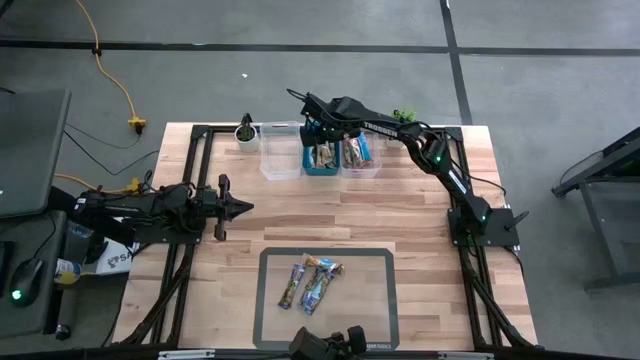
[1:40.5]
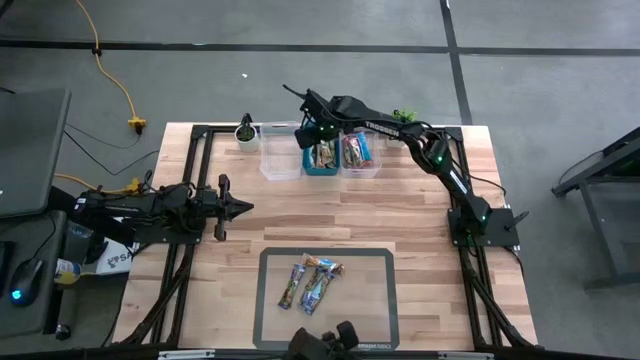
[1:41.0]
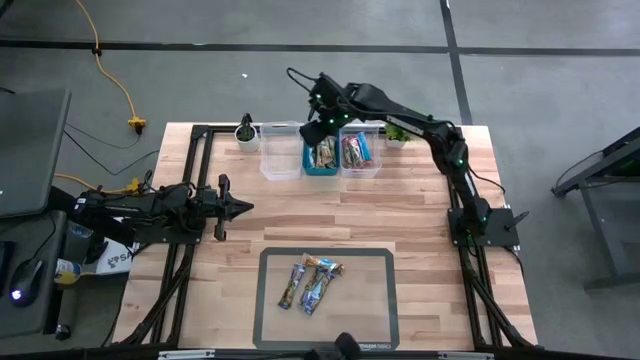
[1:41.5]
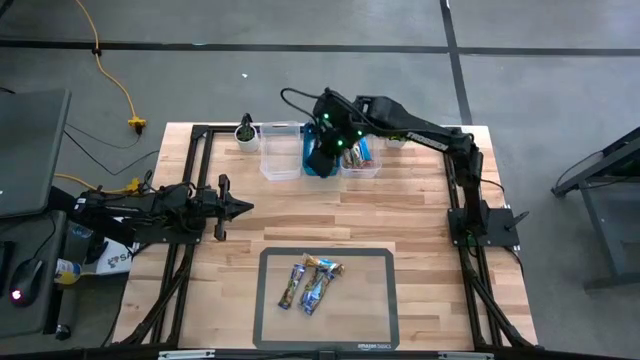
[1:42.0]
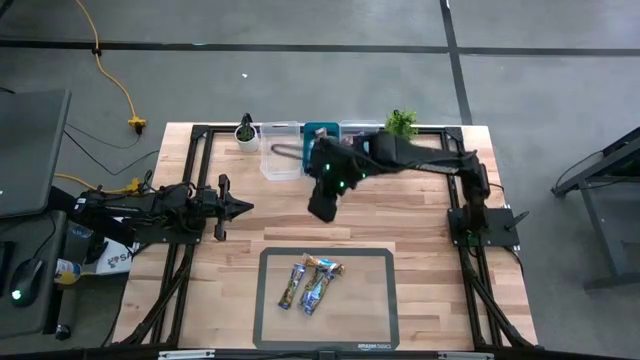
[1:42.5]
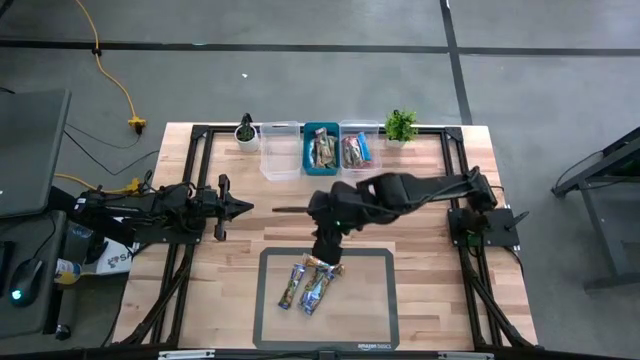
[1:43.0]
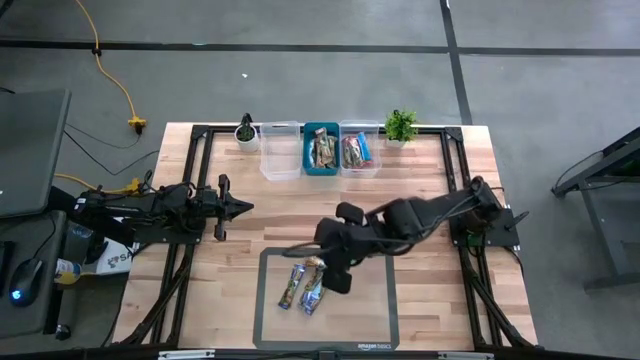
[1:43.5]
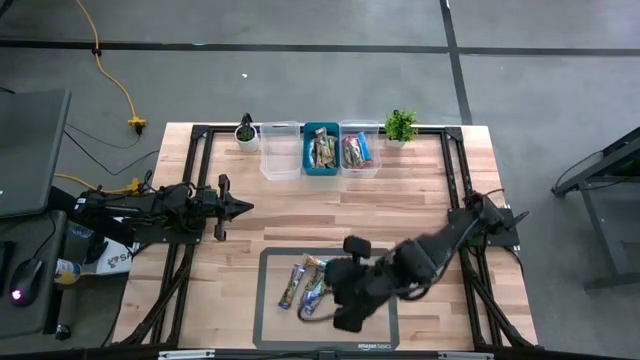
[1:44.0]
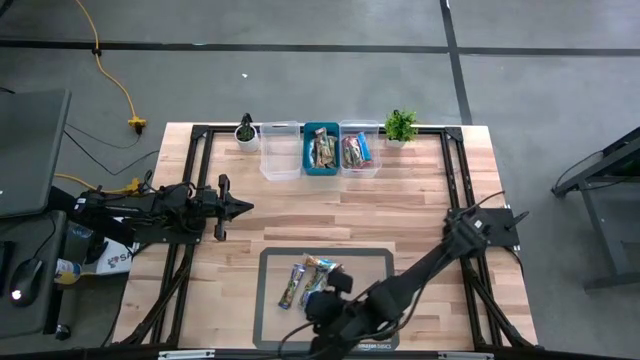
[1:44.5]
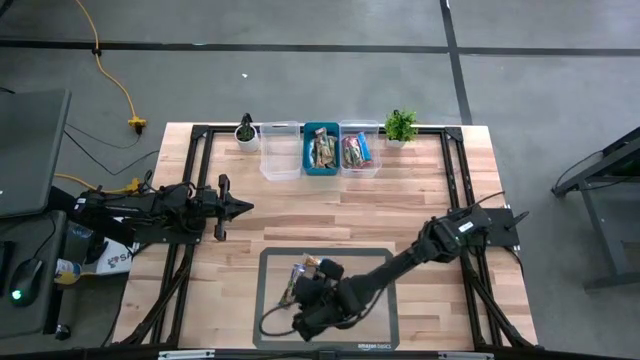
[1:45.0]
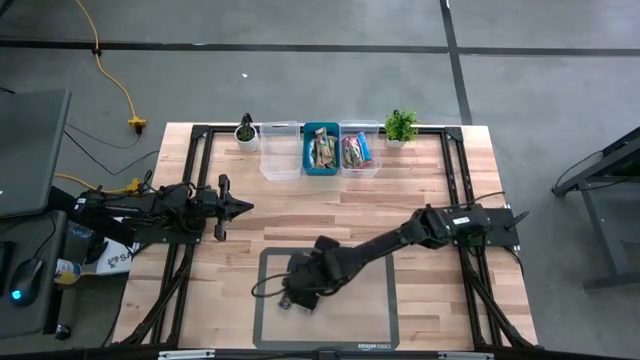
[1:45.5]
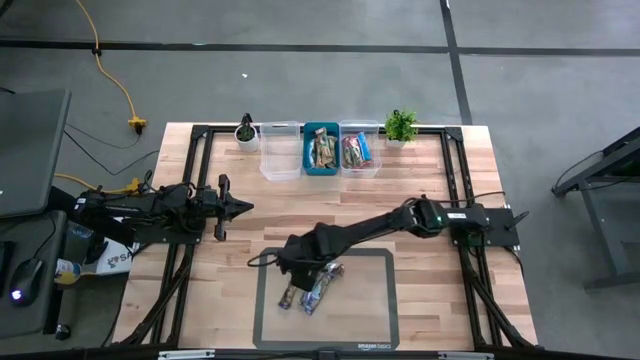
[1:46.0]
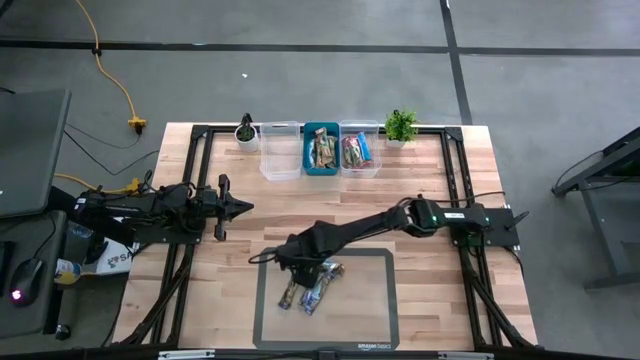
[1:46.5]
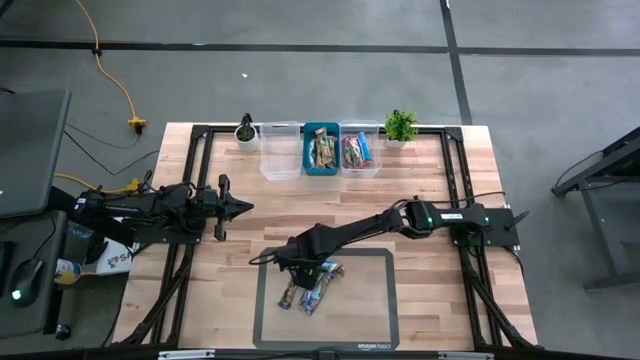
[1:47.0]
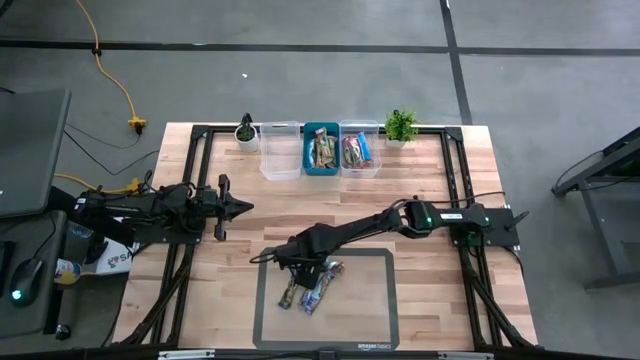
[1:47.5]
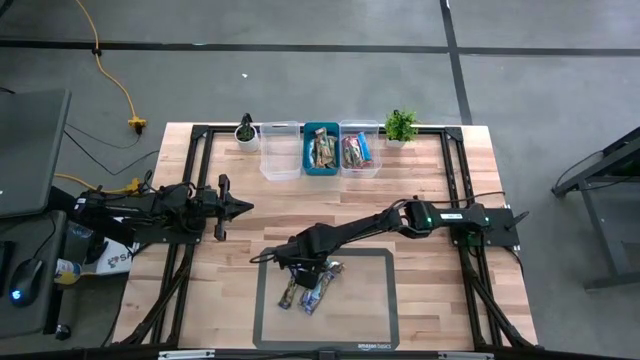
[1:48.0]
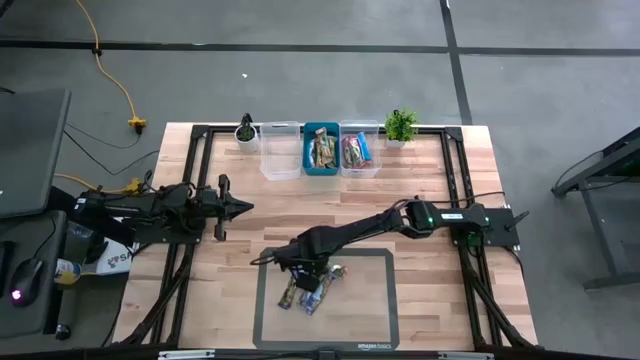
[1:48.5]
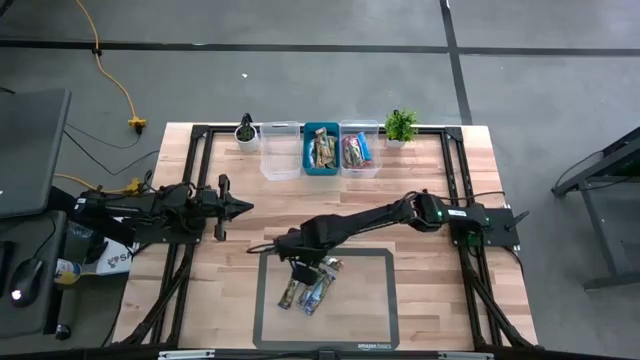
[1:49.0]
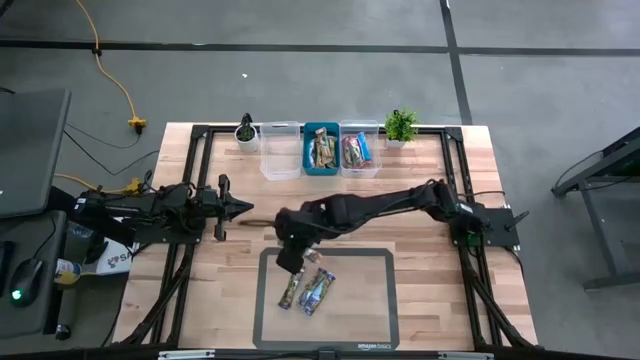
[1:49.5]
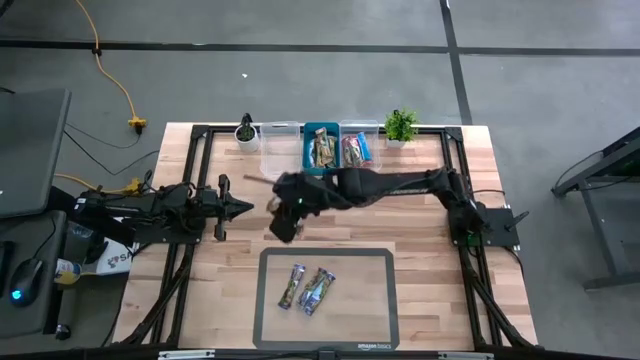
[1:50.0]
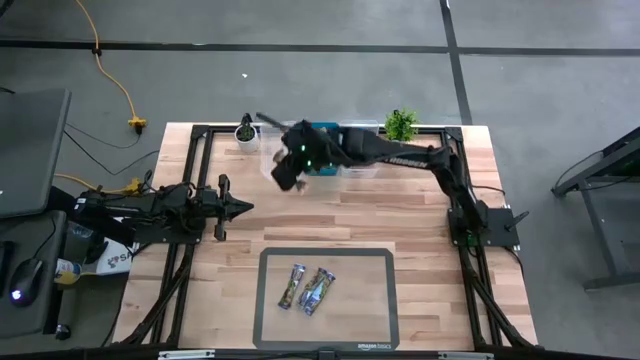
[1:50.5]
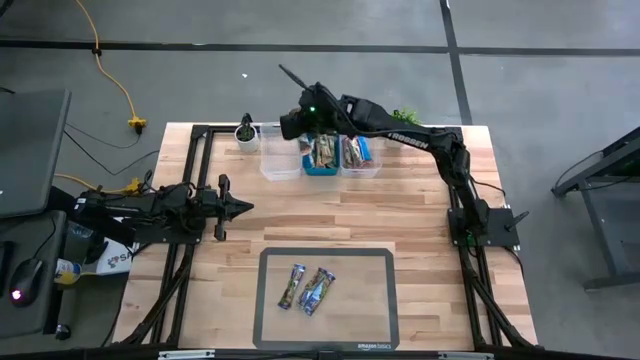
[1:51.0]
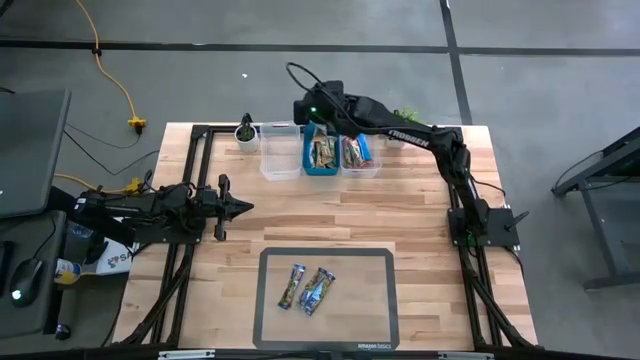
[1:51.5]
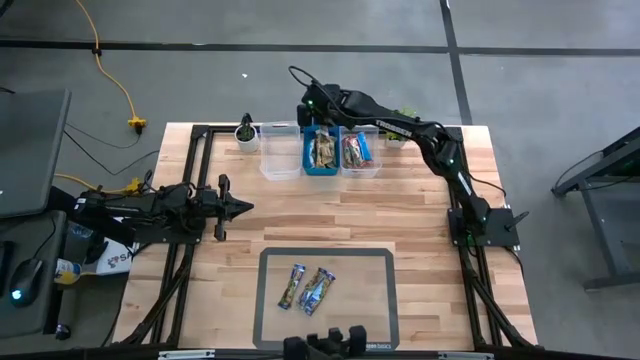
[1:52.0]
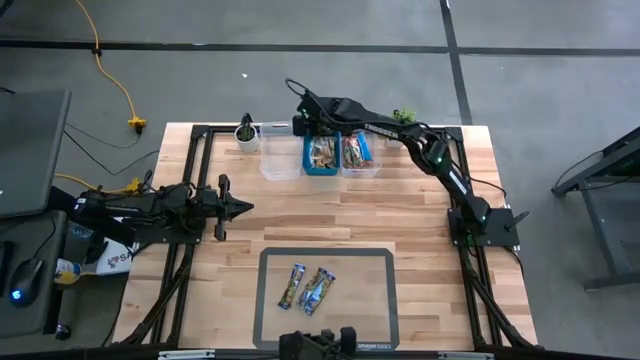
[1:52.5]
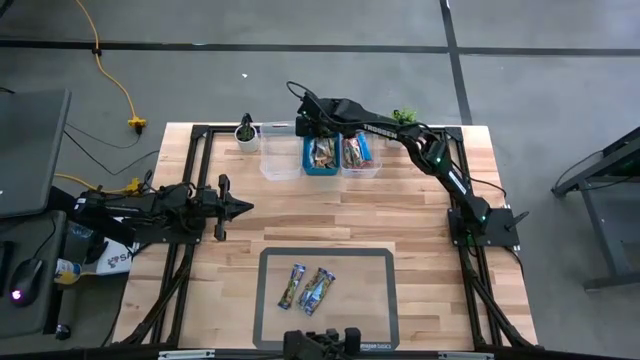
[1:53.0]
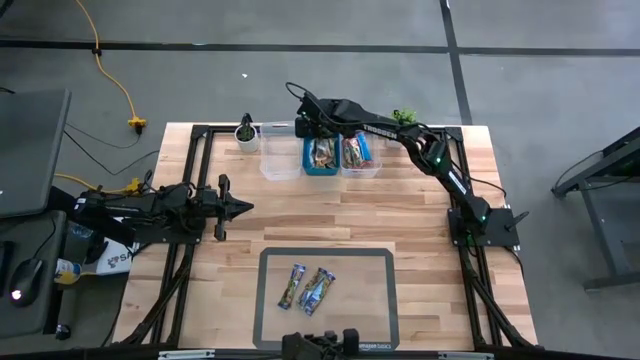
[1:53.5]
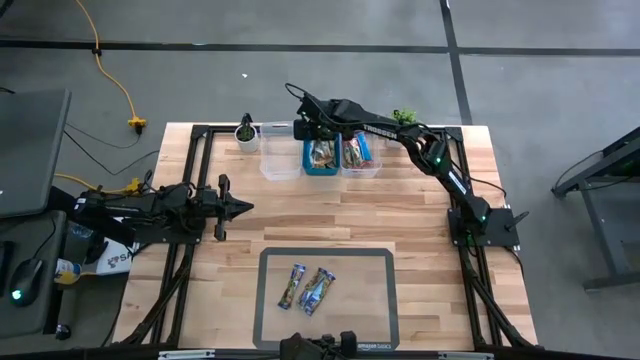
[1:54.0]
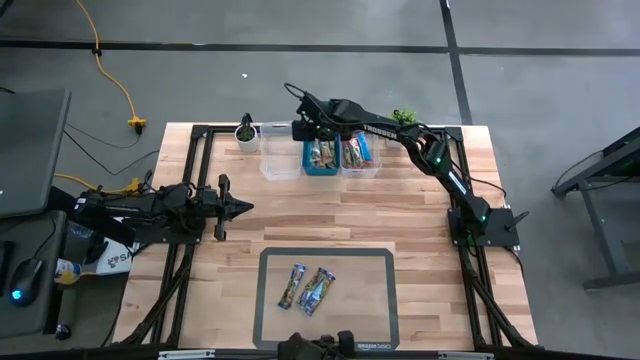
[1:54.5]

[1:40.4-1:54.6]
Task: Pick and place Granola Bars by type
Put the yellow granola bar into the blue bin

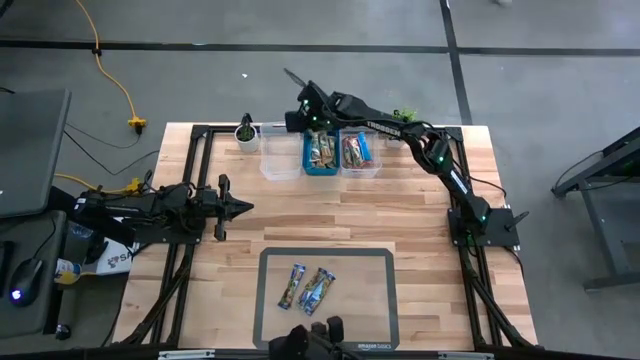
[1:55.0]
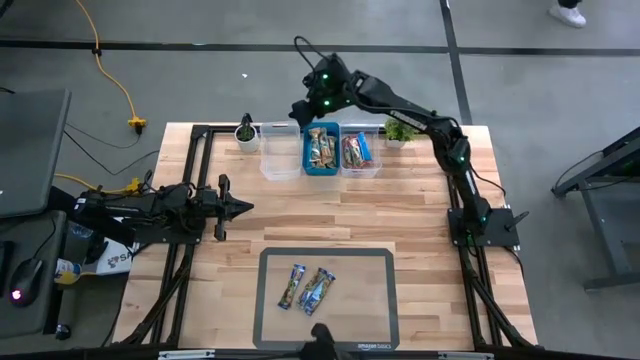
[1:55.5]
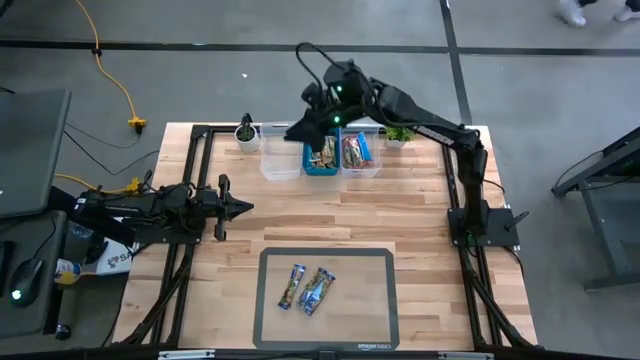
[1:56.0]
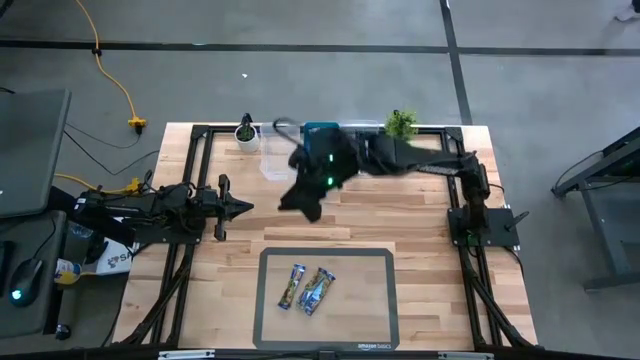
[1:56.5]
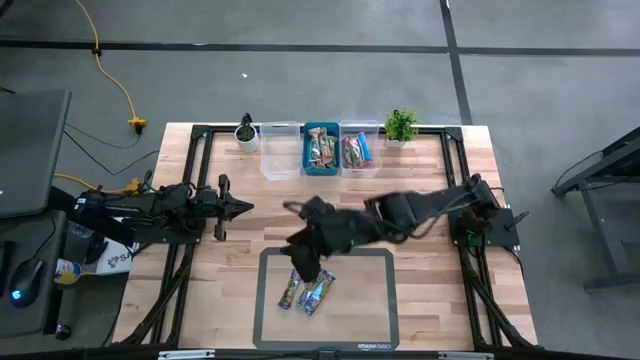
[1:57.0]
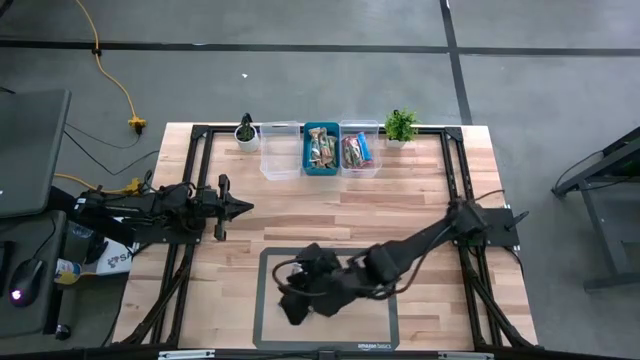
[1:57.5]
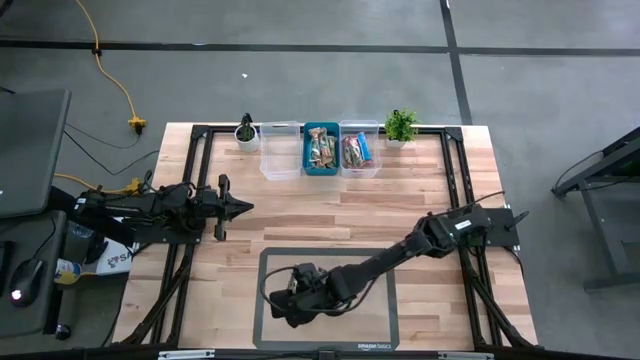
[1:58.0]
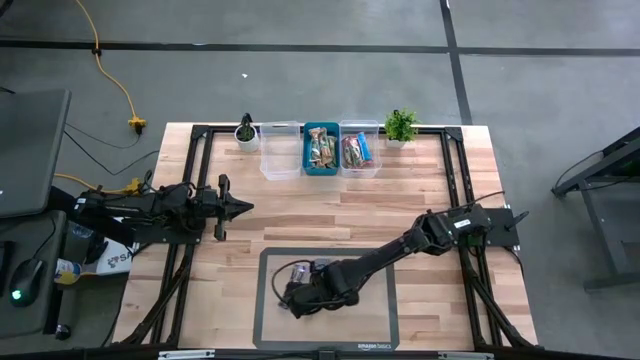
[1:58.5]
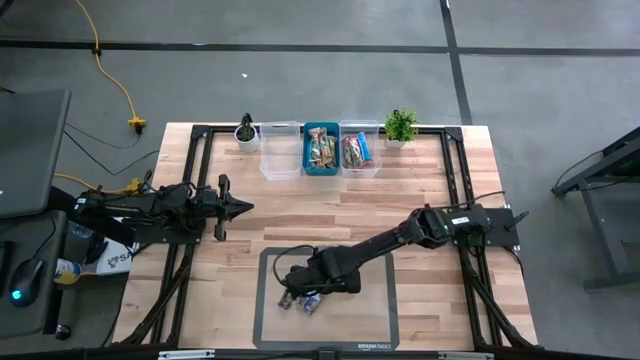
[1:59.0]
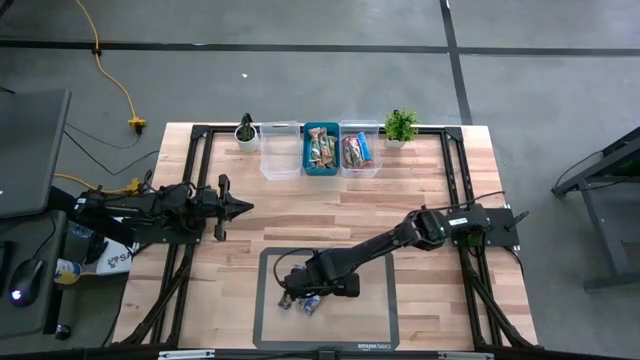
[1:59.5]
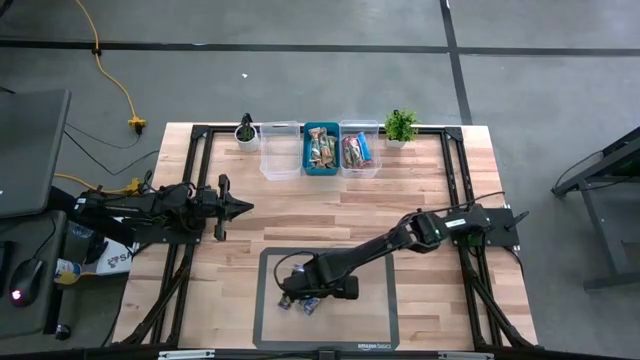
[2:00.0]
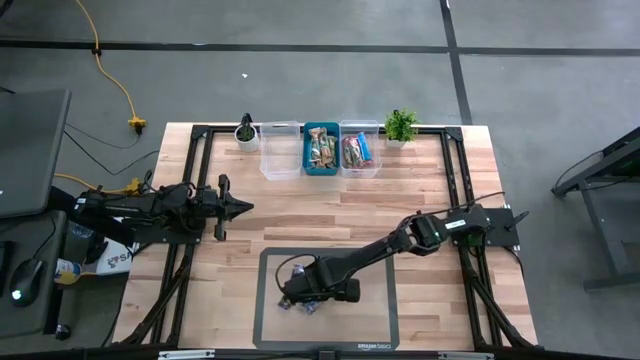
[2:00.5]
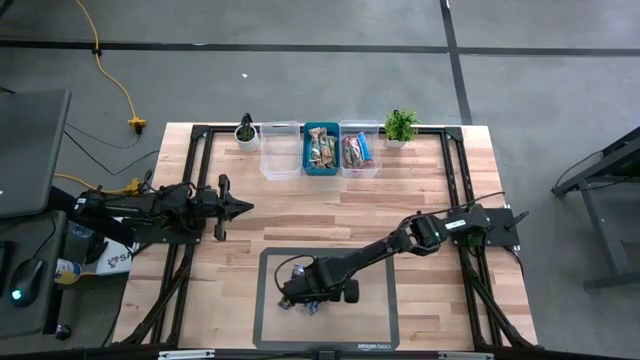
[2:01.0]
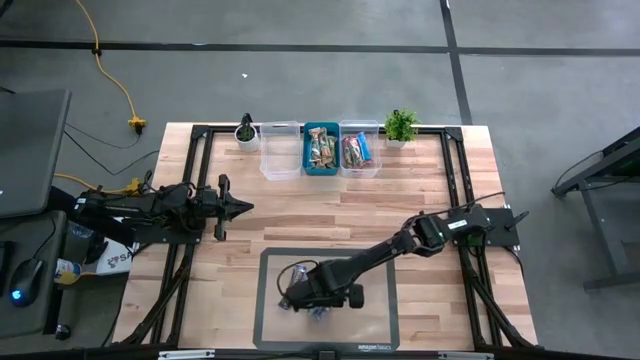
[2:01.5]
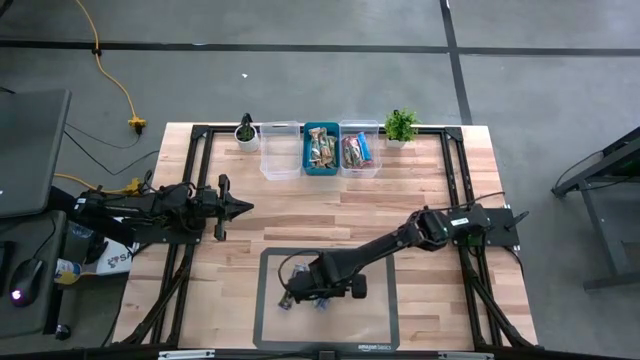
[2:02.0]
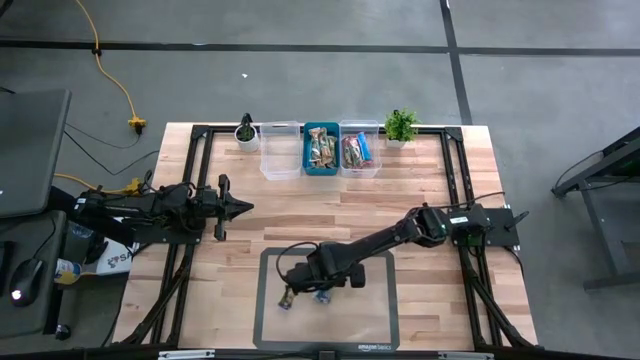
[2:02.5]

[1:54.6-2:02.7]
Put the blue granola bar into the left transparent bin
